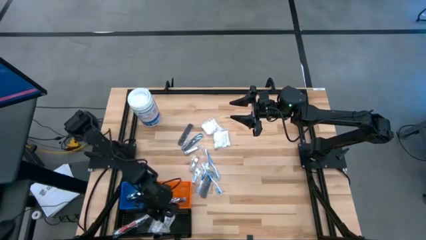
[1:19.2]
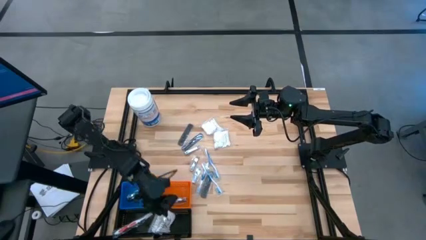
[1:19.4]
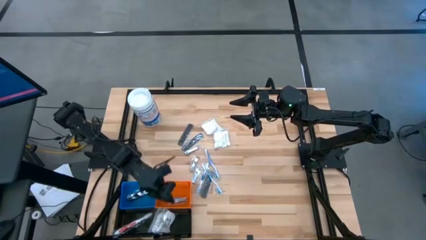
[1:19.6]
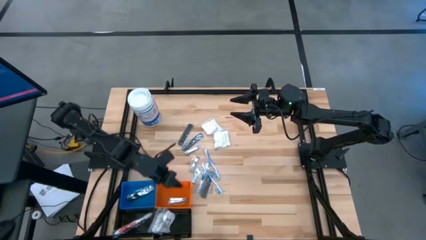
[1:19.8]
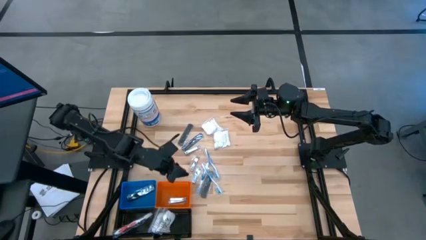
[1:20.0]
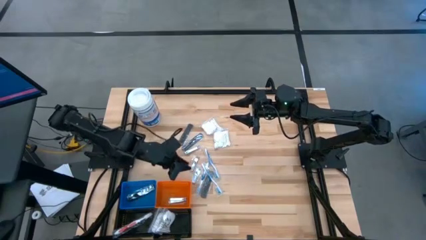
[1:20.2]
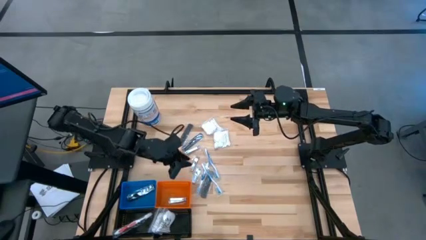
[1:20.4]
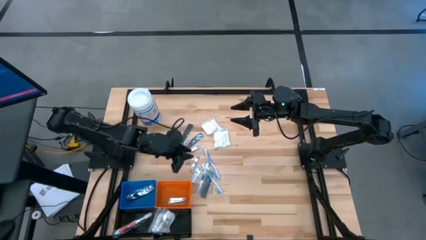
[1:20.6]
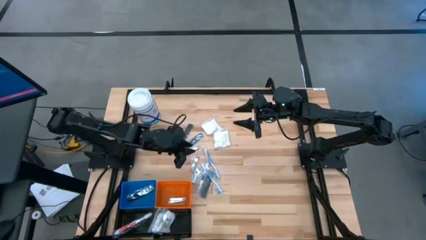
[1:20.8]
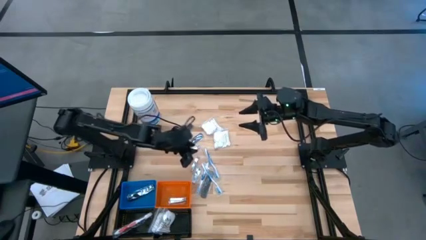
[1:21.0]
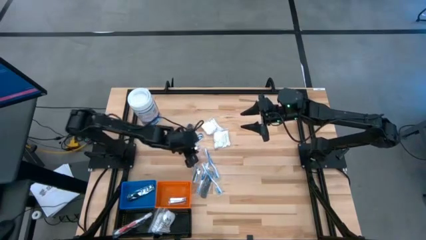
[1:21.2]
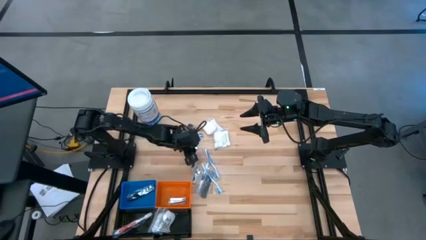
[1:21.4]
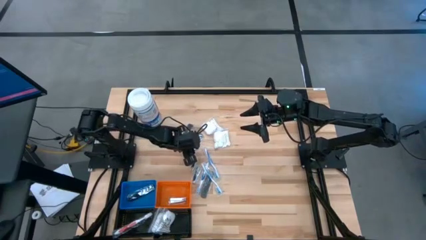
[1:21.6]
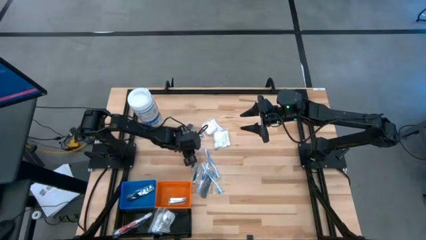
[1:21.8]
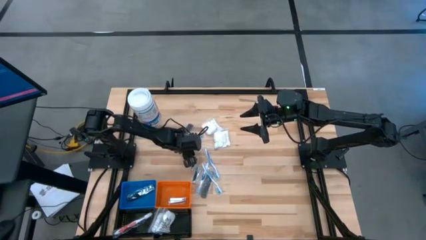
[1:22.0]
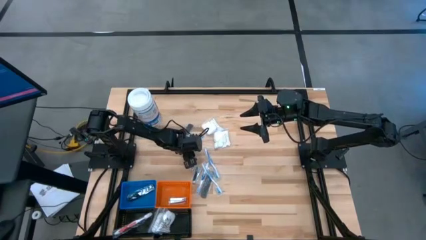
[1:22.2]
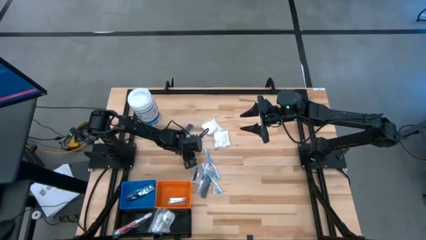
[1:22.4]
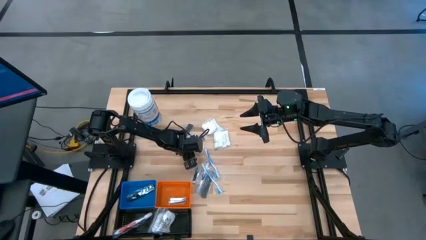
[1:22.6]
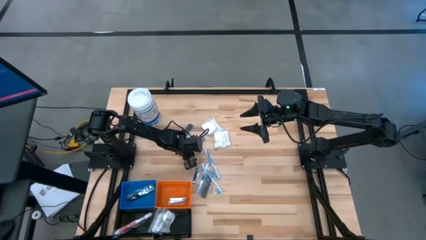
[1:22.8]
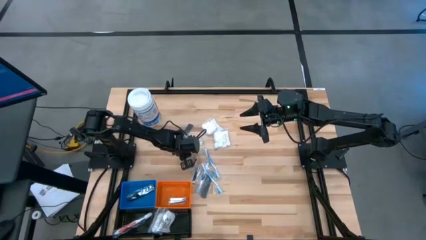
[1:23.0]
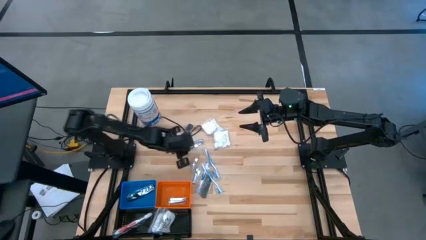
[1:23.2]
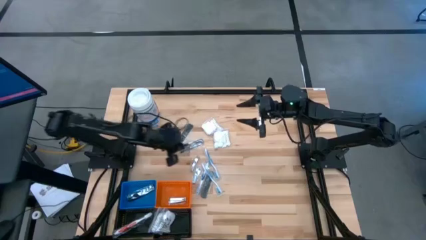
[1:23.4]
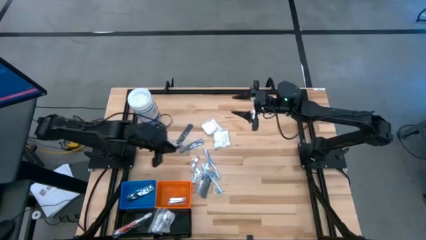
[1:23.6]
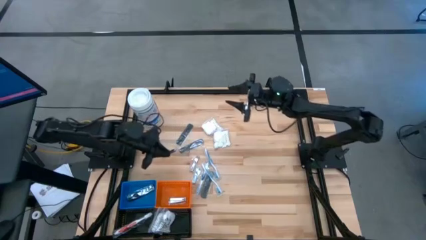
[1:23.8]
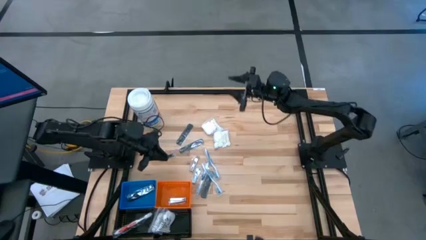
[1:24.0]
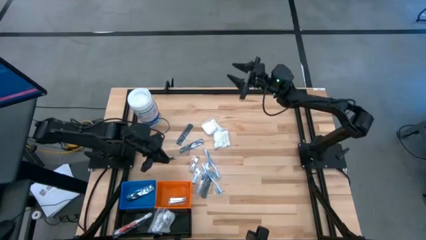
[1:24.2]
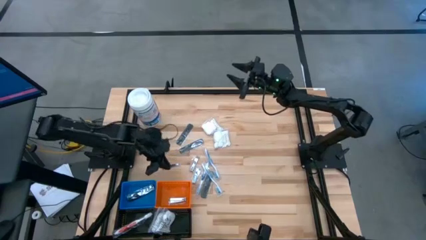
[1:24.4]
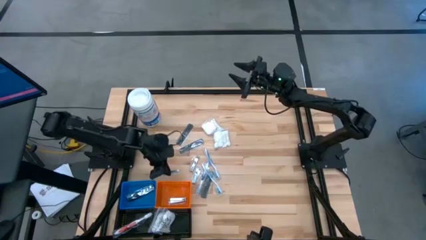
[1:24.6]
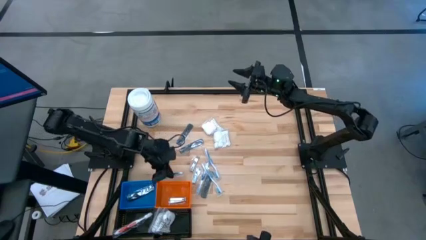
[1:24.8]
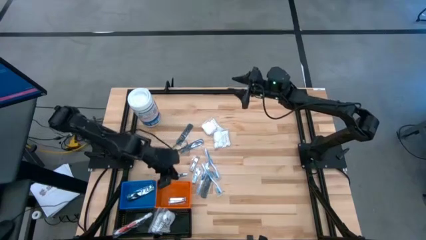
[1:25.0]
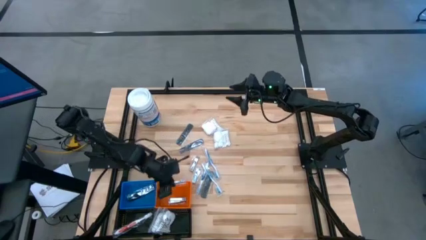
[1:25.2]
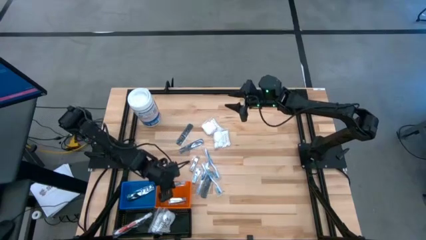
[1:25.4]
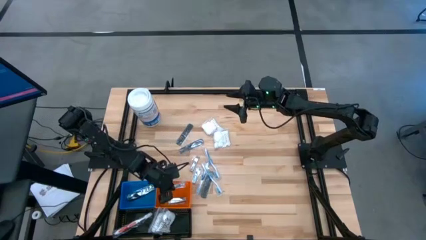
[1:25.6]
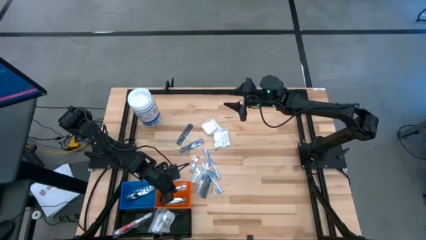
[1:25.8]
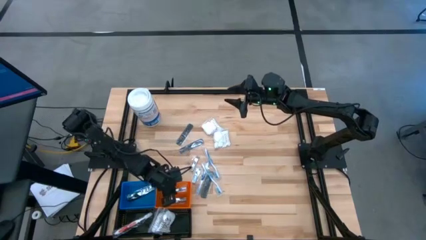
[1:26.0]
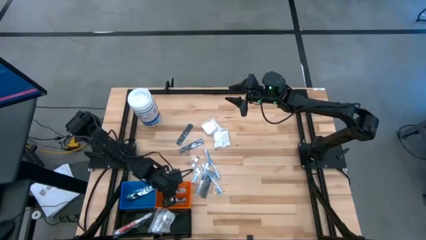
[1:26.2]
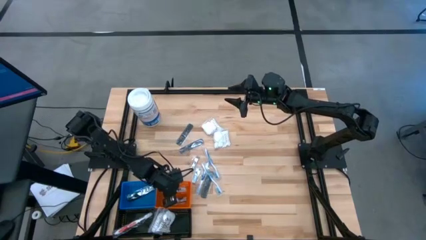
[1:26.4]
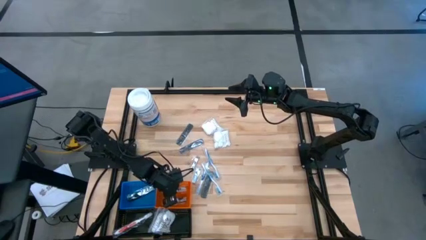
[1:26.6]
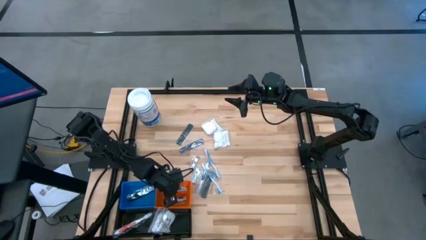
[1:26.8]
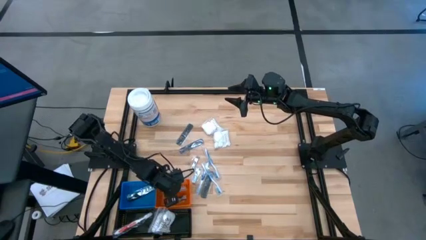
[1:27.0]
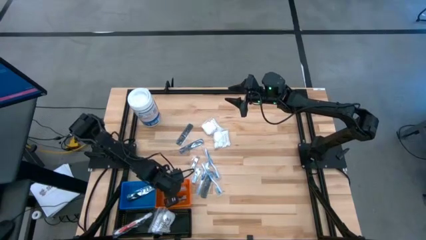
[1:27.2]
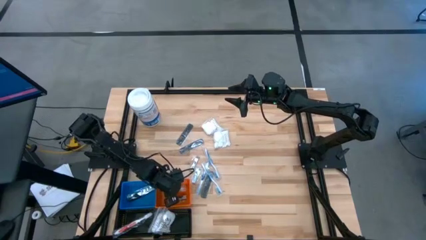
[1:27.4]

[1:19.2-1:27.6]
Task: Pick & Place Travel size toiletries
Put the top nail cutter into the orange basket

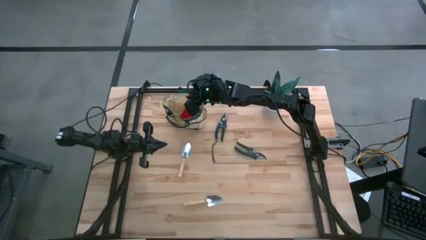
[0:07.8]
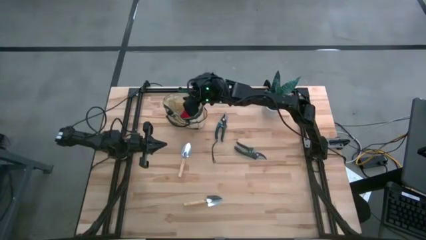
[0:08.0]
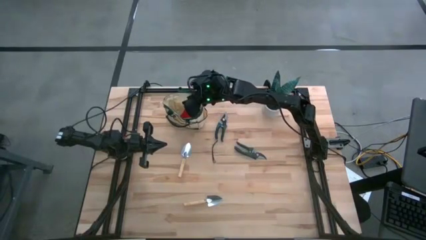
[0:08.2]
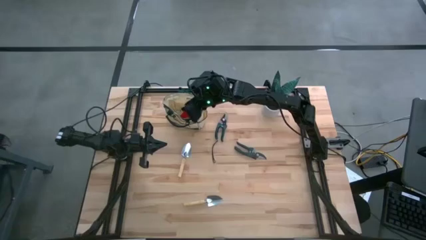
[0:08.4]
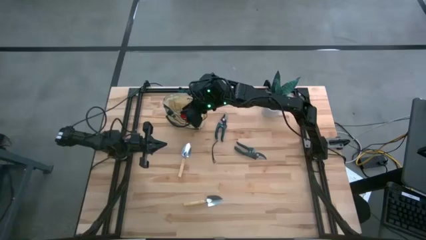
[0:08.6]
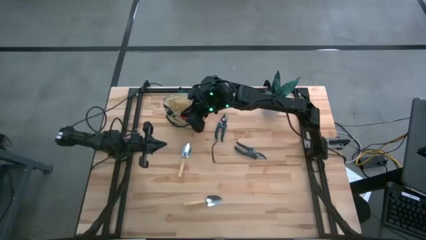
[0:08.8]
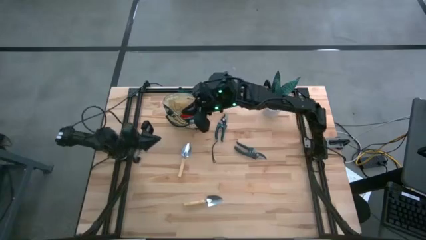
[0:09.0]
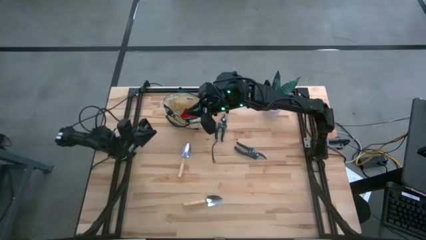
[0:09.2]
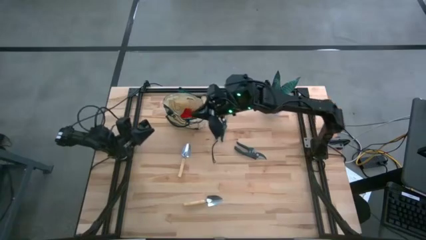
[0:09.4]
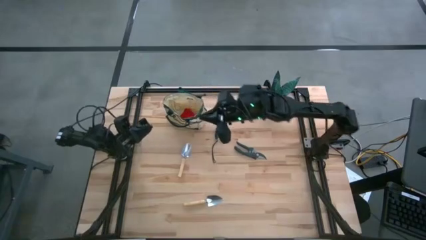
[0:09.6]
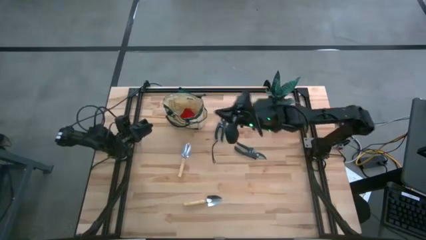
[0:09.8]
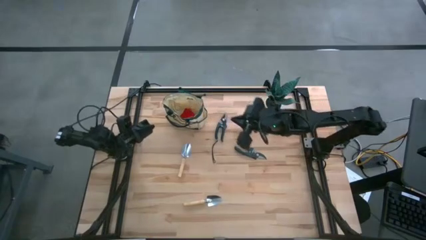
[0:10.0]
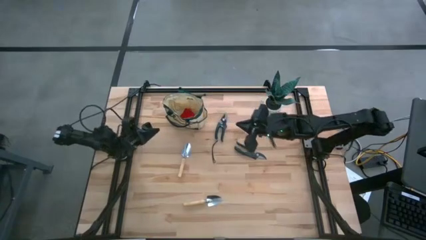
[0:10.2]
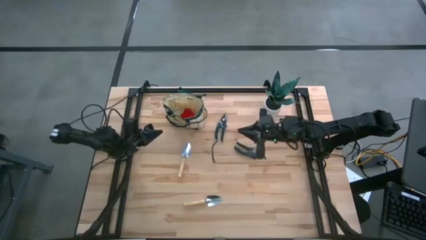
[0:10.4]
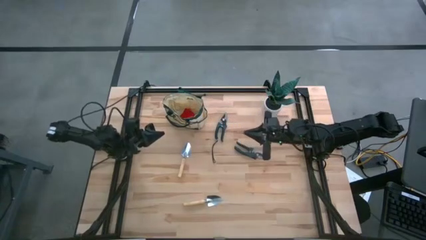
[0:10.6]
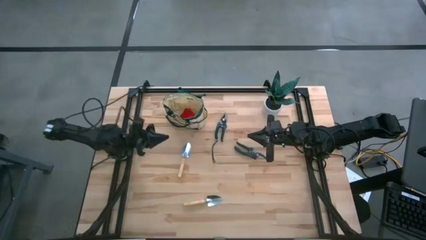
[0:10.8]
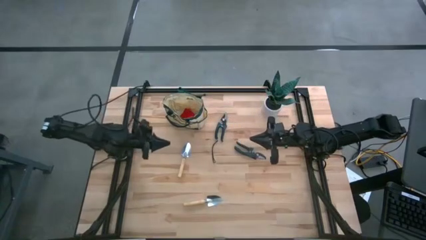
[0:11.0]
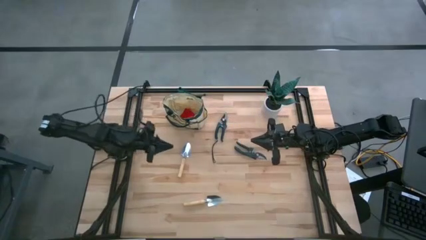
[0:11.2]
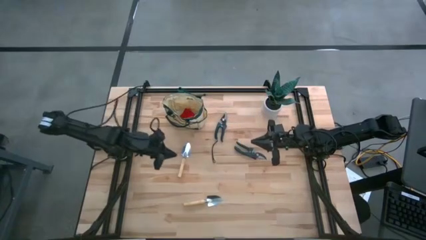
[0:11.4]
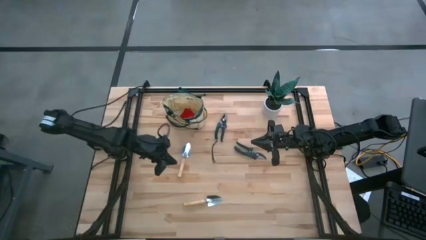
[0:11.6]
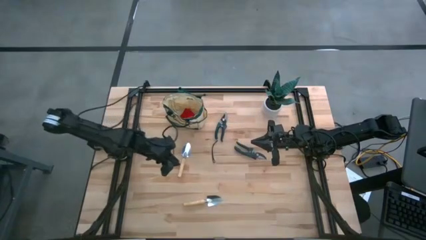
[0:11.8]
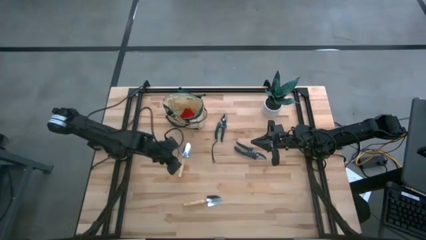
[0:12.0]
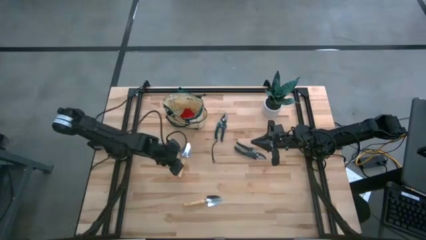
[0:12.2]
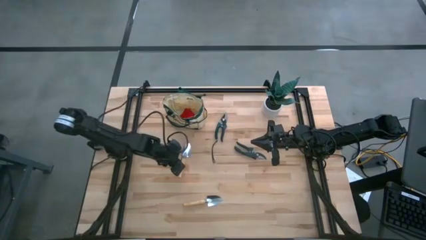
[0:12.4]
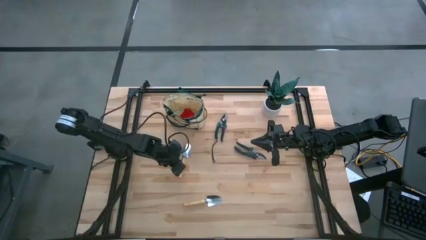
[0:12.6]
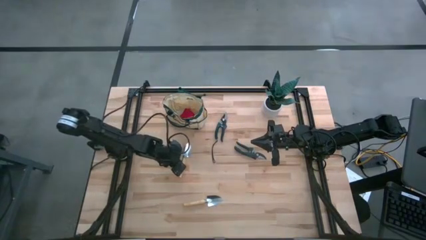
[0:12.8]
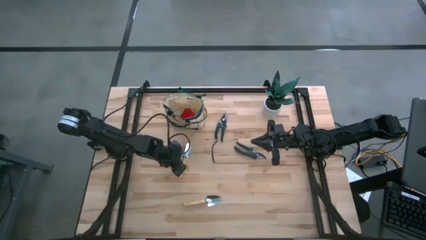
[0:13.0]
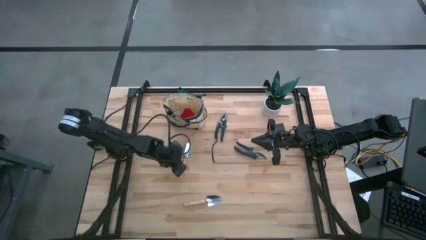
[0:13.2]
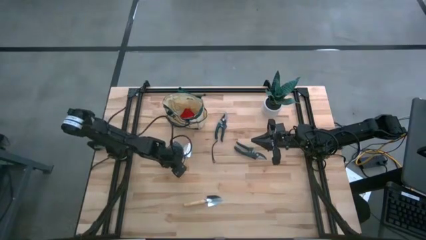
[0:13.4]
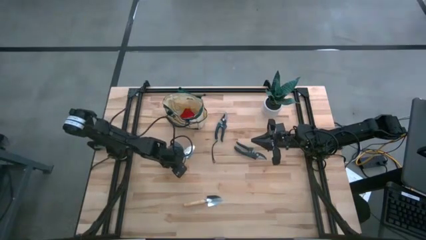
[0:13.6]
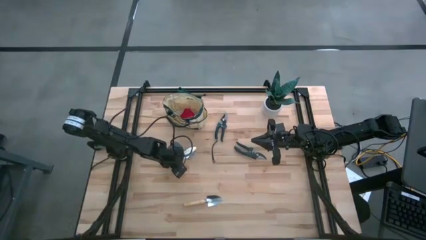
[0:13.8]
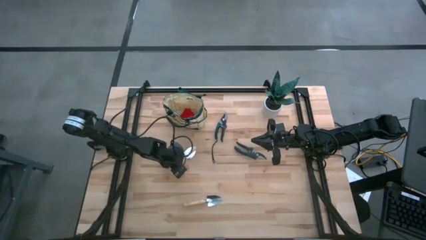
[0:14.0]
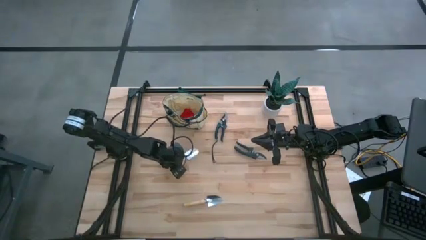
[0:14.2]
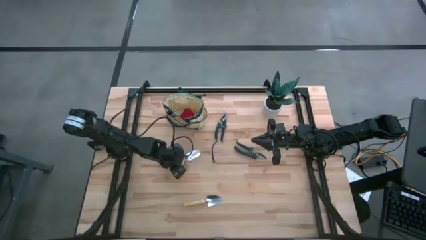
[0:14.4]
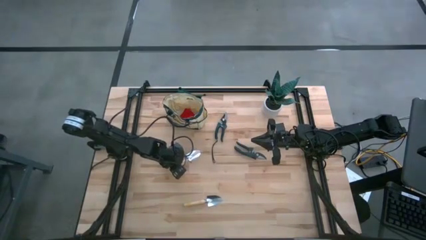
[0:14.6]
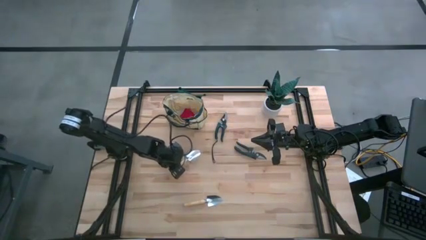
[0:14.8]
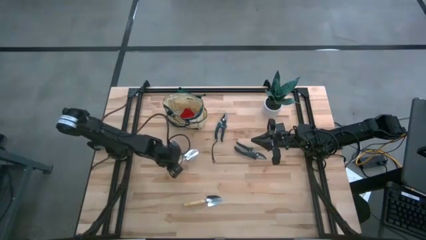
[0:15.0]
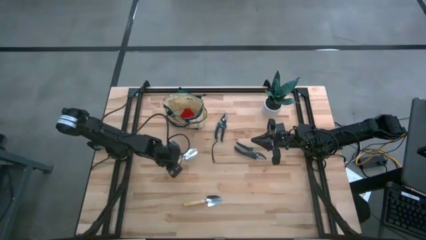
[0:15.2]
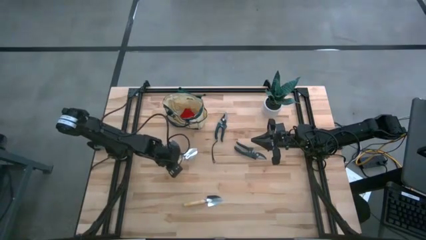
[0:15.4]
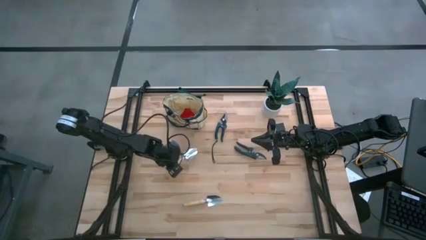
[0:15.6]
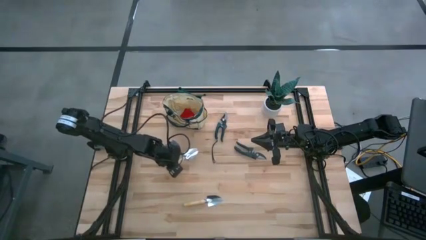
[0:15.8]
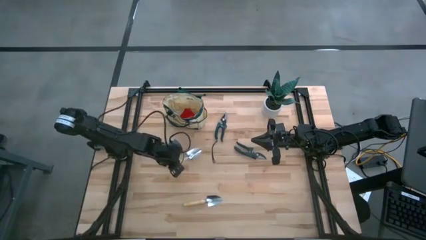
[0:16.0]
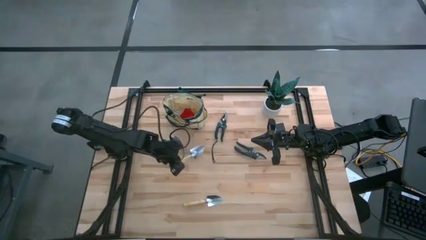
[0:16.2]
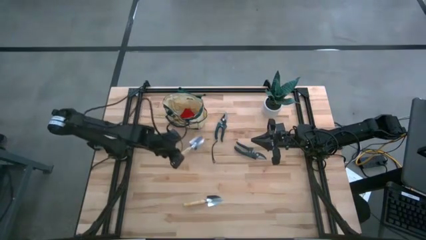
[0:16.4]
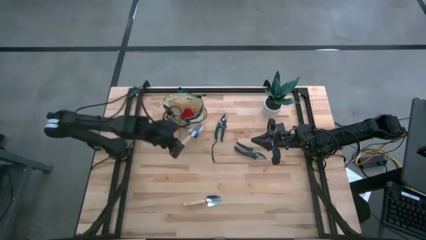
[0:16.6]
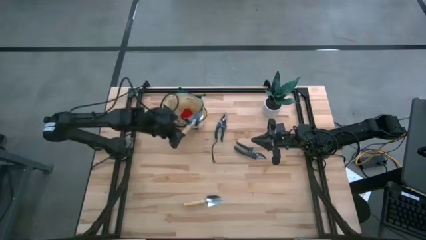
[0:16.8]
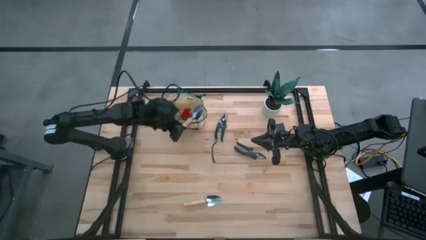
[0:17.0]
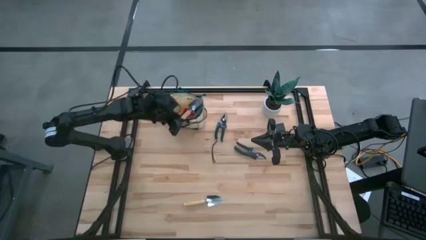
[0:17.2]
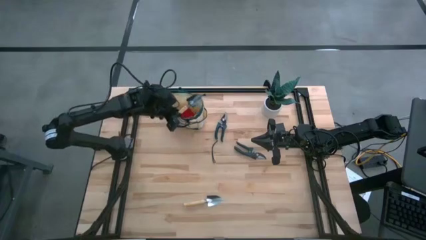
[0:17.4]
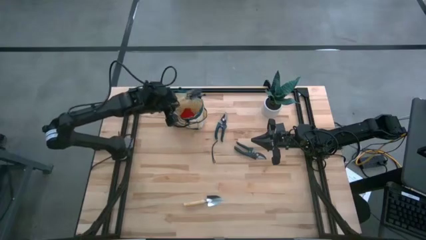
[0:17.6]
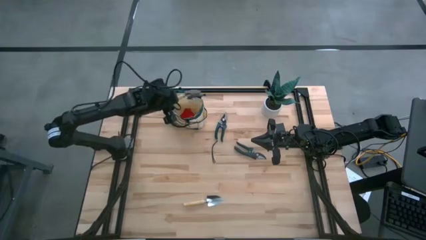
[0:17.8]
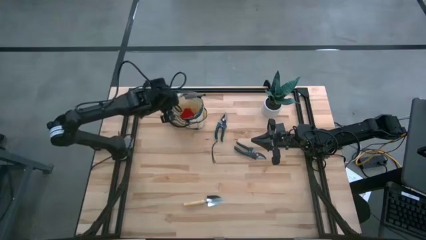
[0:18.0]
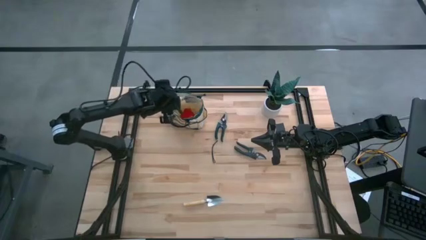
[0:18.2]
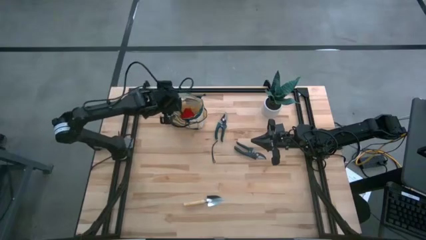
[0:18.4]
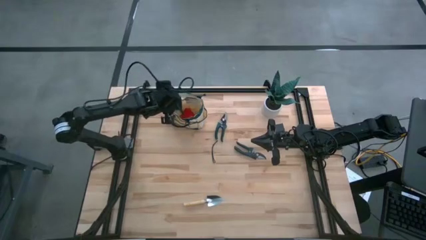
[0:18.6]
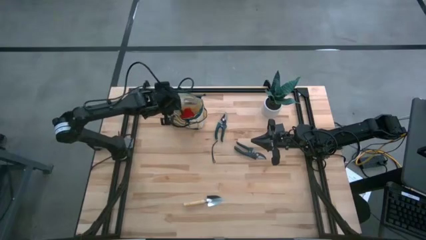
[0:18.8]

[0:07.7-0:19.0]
Task: Pick & Place Garden tools in Gardening bag
Put the top trowel into the gardening bag
